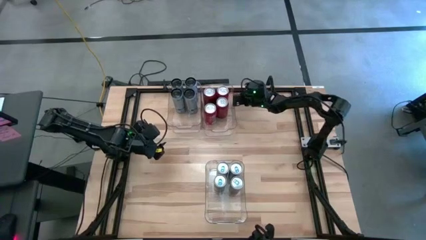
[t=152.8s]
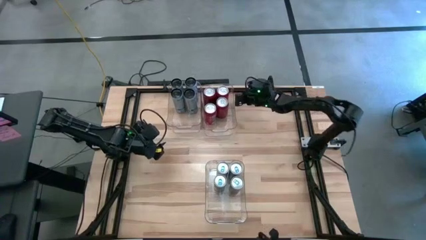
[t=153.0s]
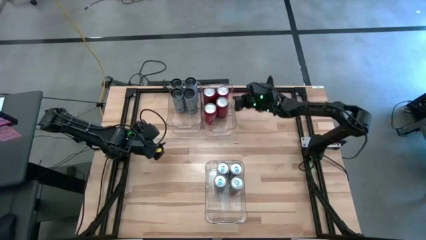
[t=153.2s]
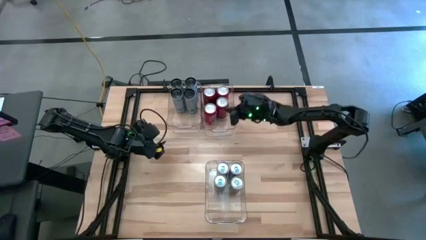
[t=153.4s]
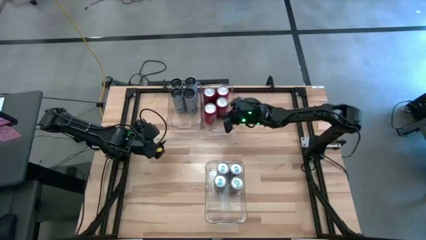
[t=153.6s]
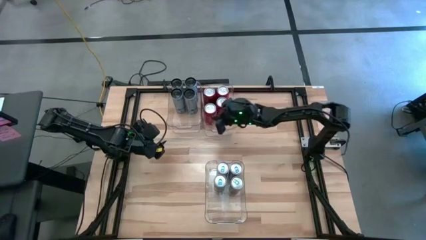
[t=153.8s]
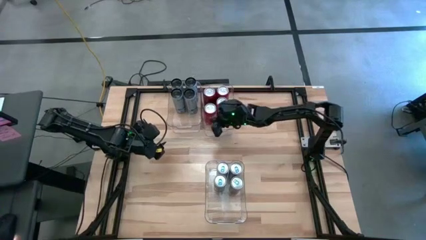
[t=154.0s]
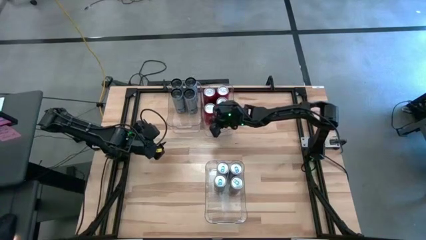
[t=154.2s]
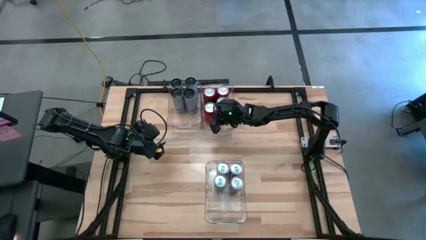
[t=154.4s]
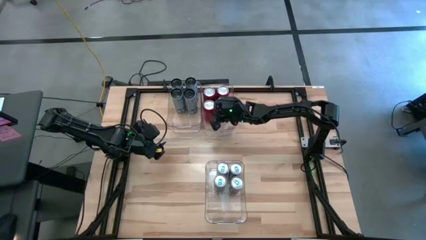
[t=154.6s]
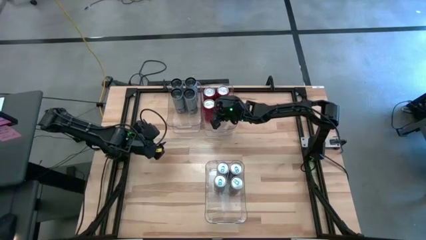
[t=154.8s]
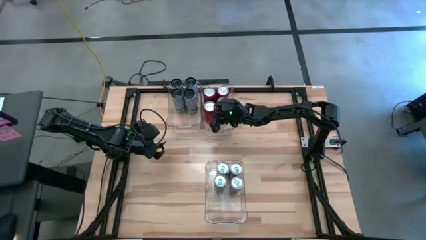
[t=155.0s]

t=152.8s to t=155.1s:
Task: Sort soda cans
Adjust the red soda can in the top right transparent bin

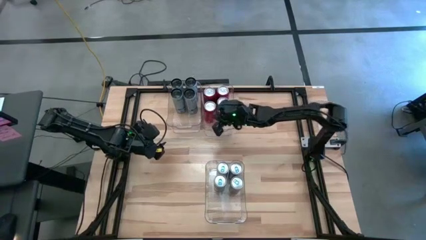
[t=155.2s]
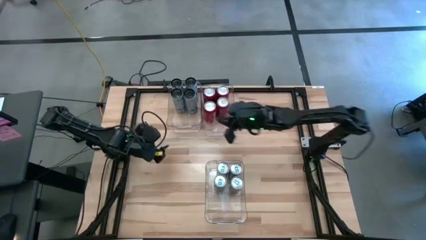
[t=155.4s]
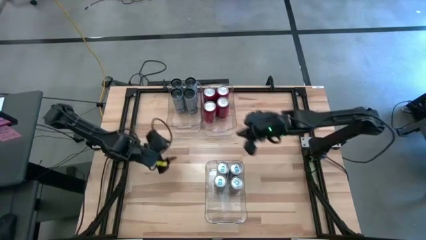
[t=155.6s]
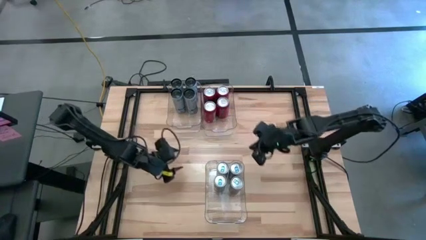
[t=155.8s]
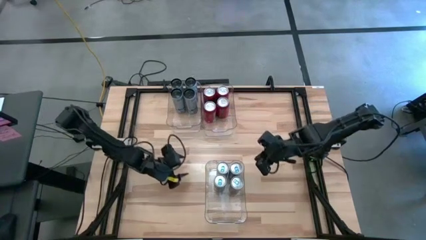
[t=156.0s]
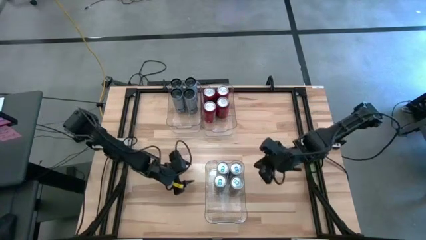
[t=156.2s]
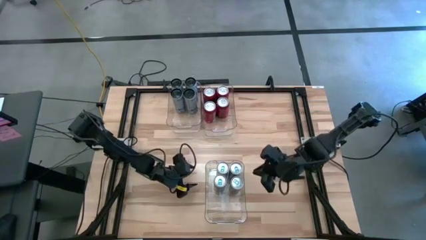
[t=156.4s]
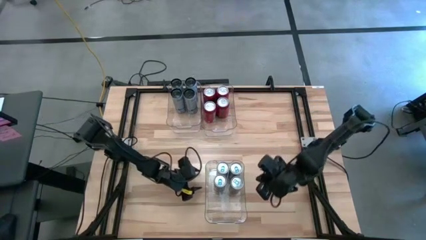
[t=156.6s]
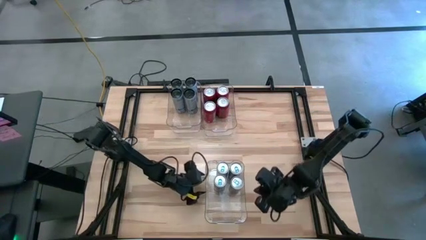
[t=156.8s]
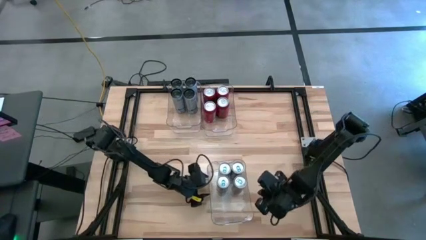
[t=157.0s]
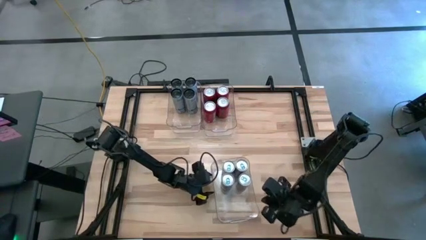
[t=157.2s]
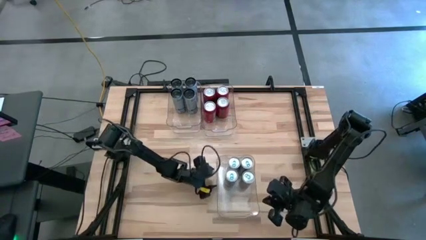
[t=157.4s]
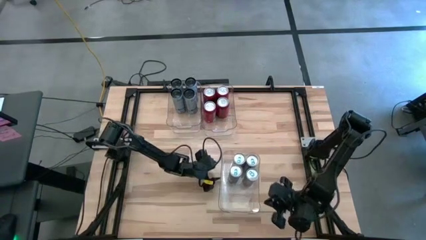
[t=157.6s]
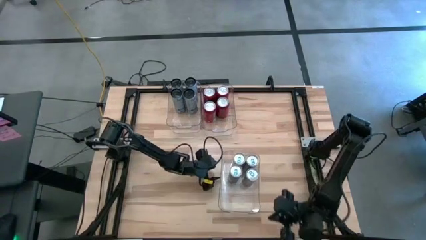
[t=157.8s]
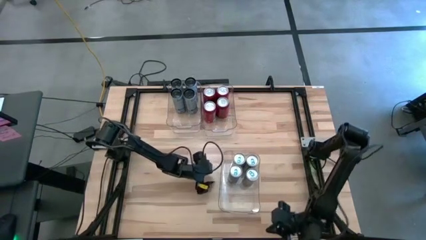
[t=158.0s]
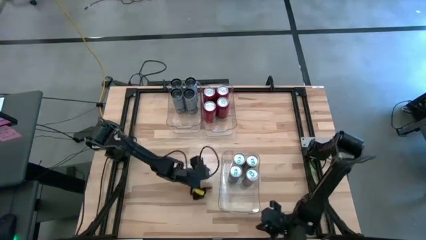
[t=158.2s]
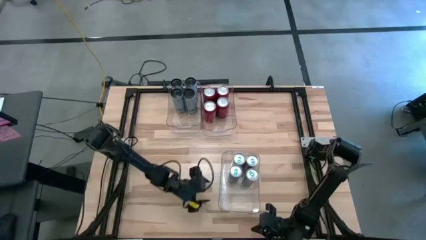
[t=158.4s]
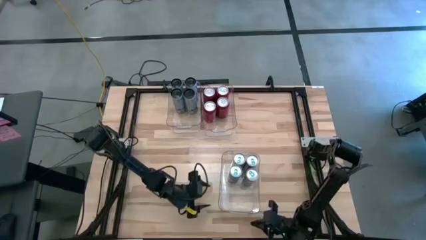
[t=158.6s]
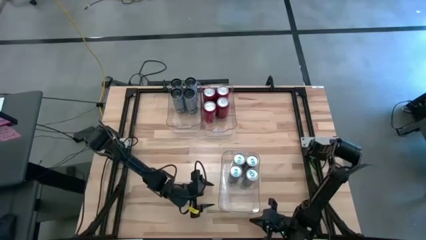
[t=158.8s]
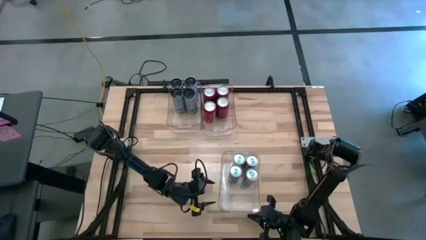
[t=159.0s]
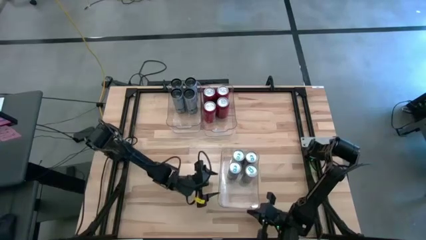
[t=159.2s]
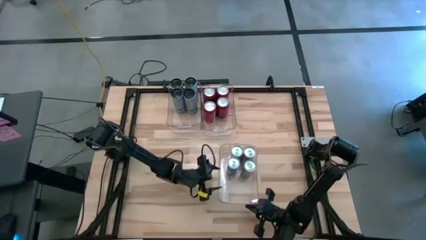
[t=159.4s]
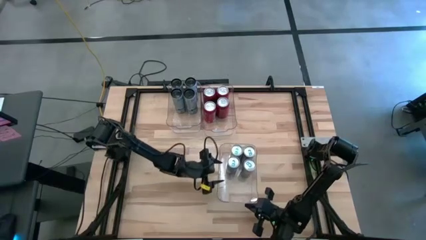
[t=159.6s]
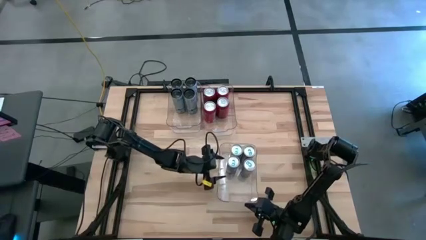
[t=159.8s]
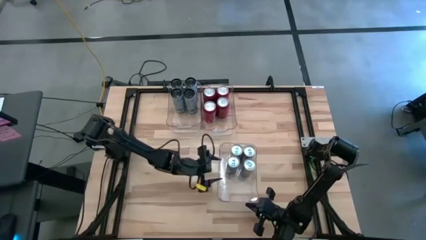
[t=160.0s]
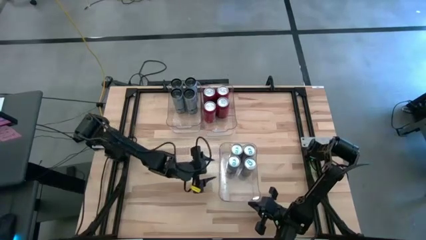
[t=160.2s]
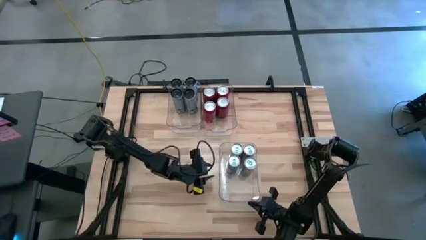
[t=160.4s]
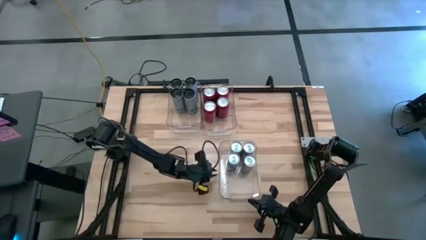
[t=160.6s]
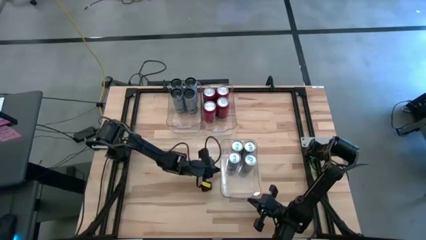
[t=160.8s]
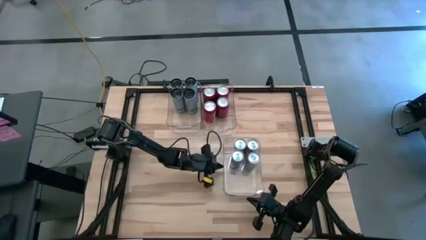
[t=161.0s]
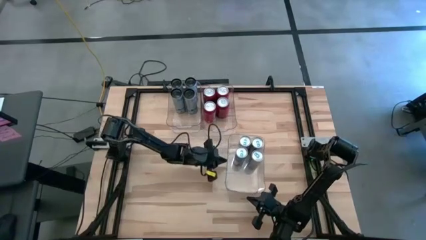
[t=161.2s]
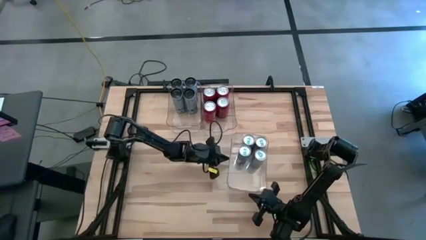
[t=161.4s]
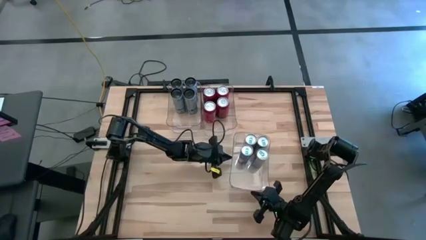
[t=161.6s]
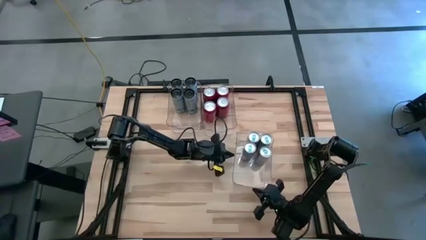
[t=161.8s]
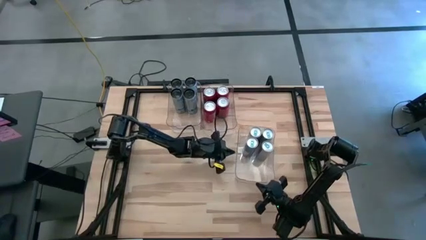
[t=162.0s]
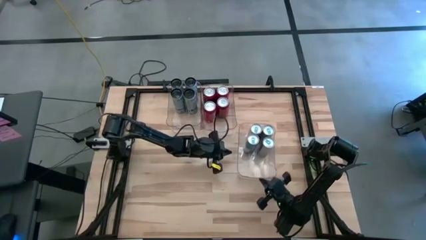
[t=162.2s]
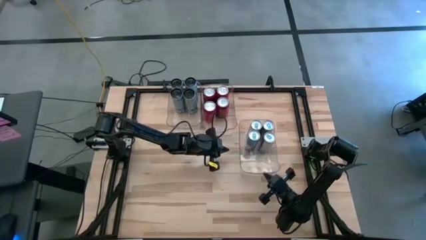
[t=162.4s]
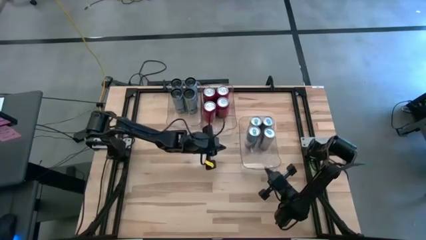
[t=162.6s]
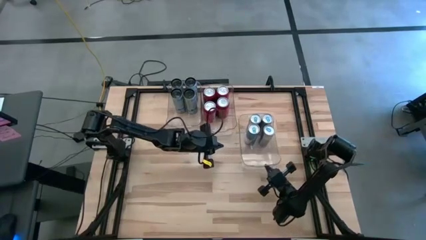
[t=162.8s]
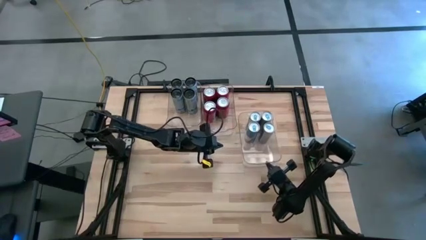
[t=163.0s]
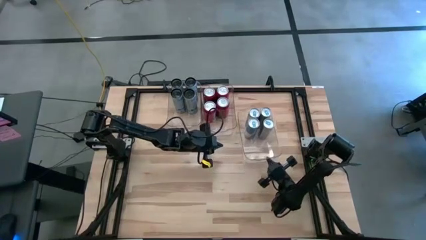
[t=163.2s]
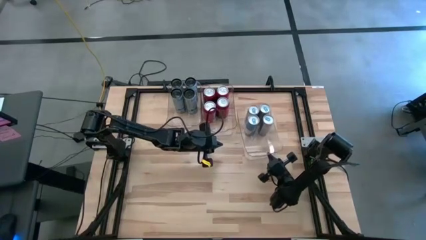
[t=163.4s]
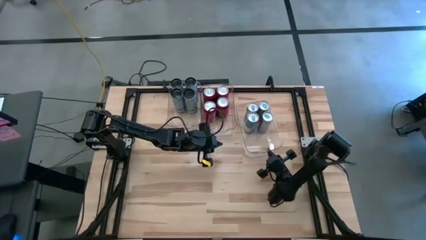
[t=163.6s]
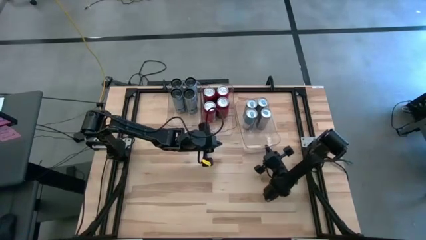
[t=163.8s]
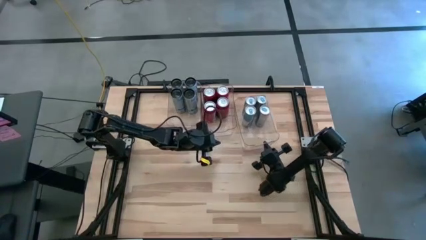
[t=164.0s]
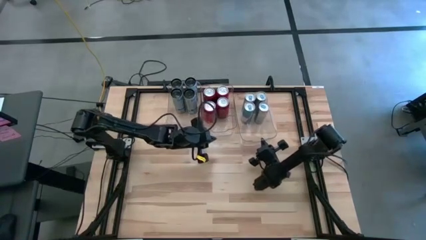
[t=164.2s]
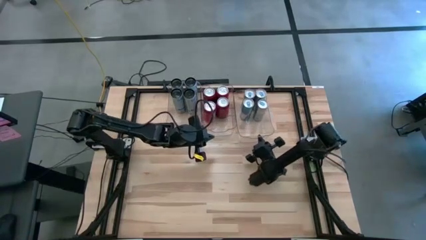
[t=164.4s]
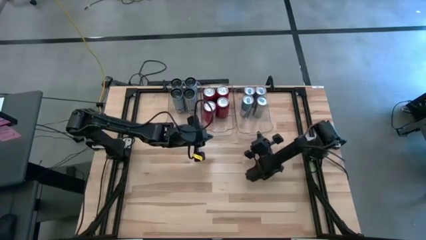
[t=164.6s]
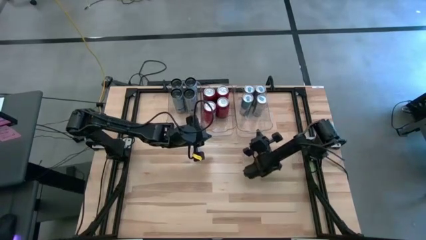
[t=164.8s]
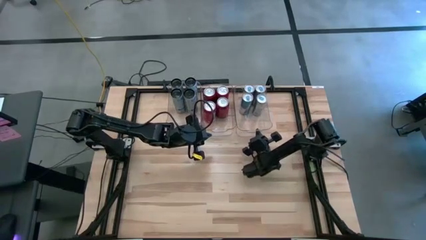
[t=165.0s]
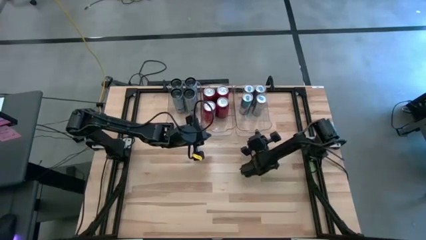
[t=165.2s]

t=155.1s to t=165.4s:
Move the bottom transparent bin to the top right of the table

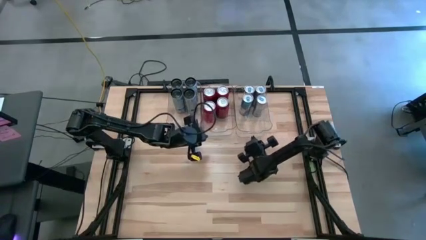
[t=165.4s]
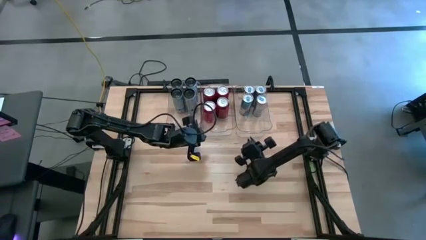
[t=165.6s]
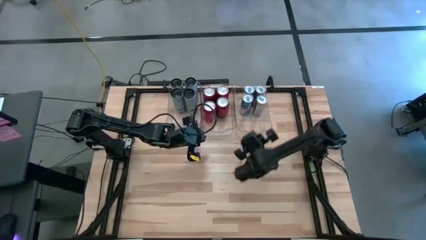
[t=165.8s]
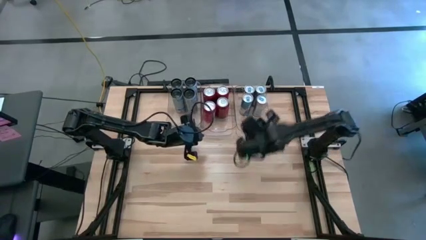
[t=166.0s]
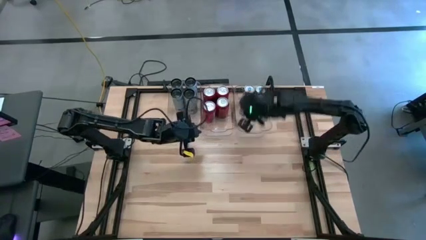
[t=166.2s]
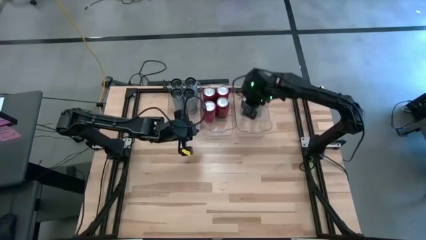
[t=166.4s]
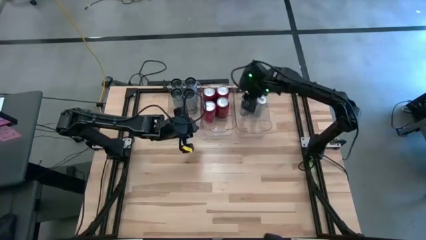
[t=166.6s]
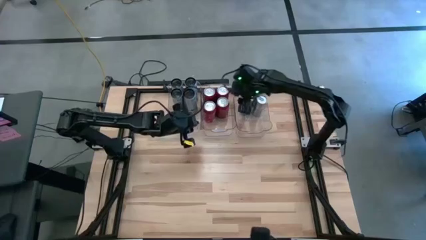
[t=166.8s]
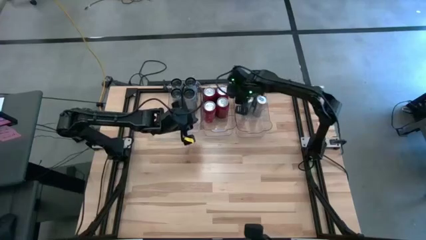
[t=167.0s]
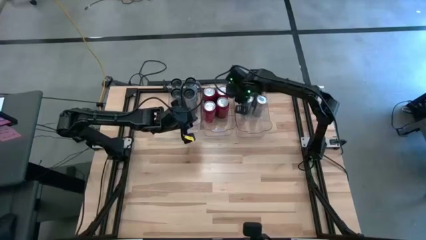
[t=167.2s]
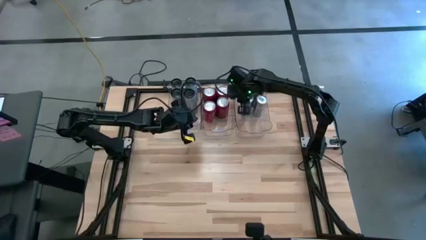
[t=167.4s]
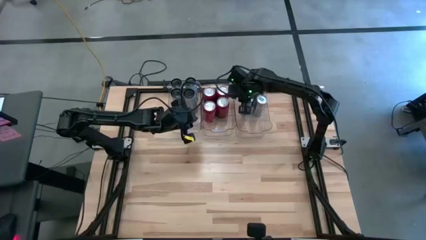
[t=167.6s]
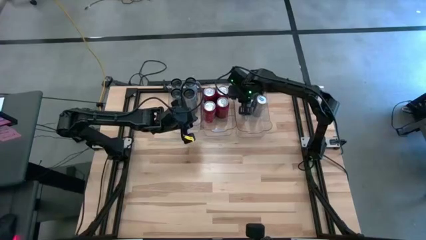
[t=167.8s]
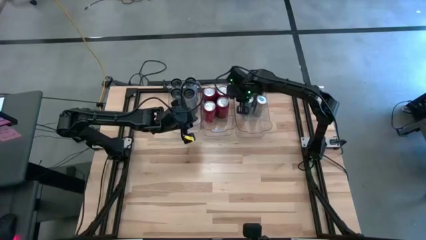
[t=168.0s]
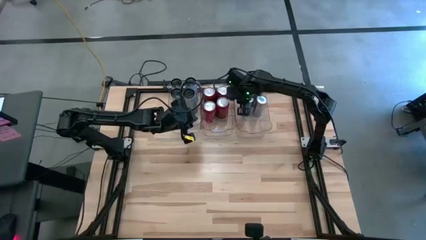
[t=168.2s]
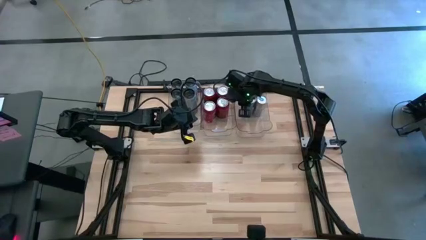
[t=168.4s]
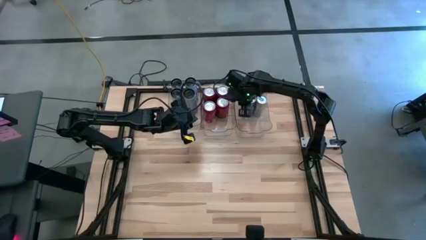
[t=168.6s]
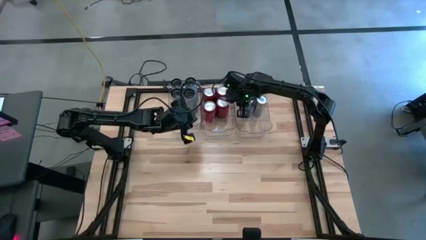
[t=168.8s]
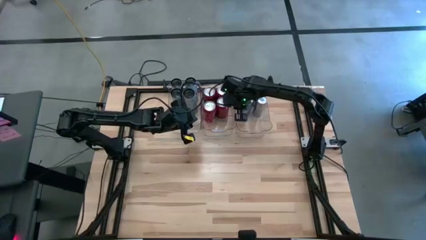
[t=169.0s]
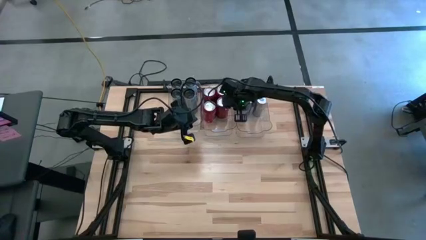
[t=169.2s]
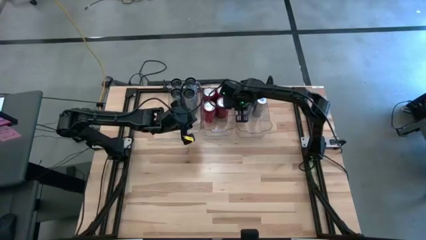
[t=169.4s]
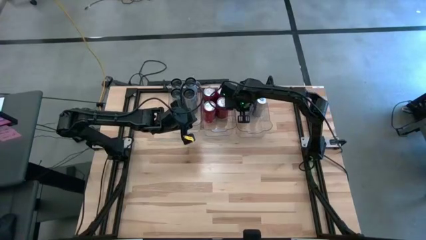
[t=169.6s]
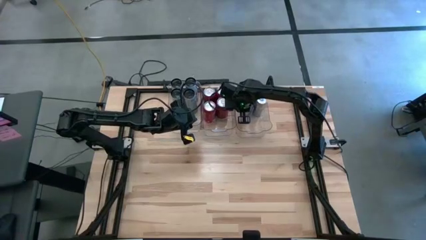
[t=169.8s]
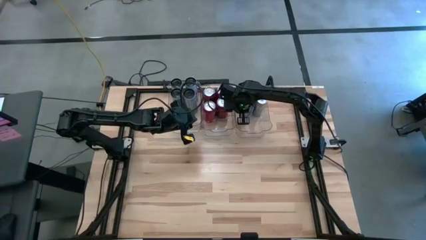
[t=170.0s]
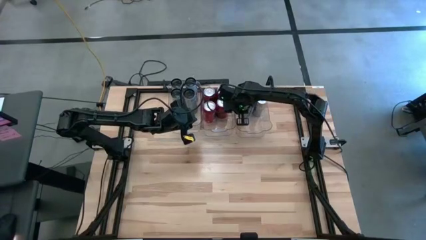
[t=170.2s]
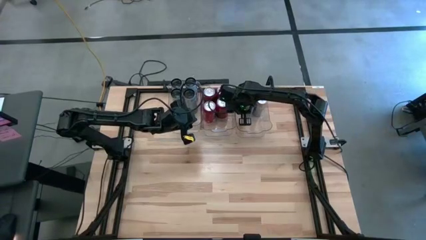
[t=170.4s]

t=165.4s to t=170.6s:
Adjust the blue soda can in the top right transparent bin
